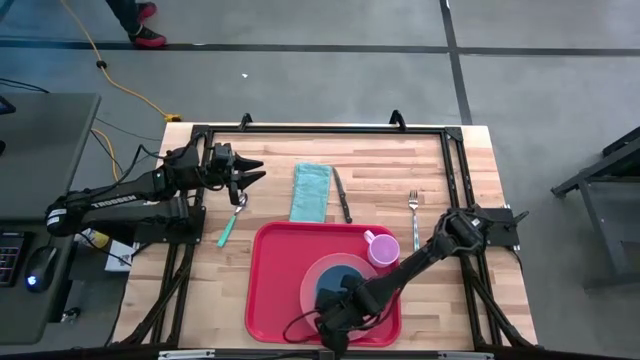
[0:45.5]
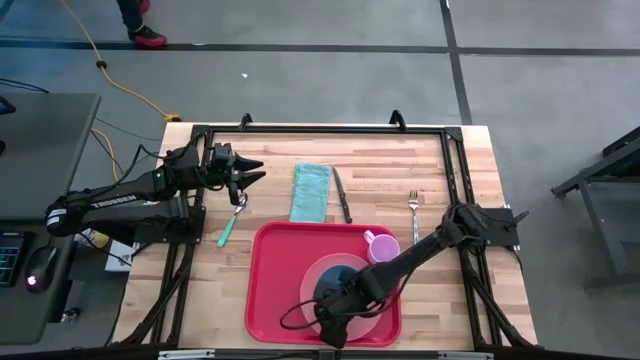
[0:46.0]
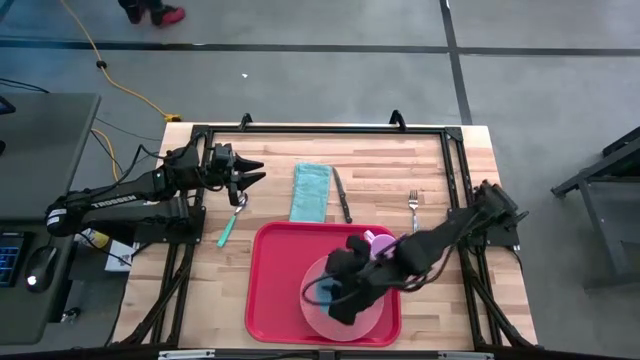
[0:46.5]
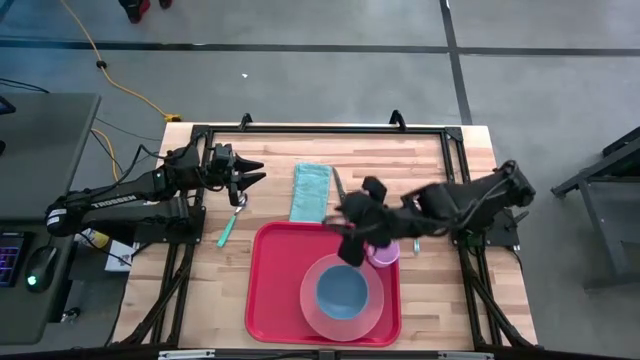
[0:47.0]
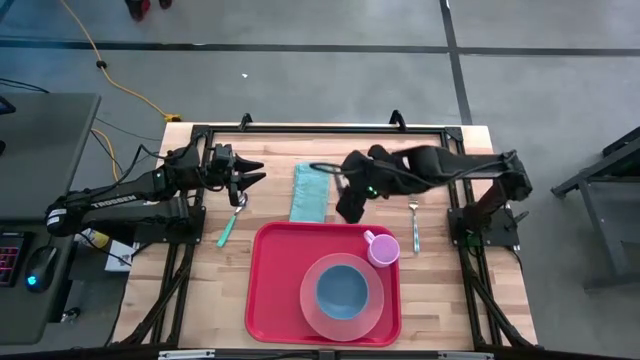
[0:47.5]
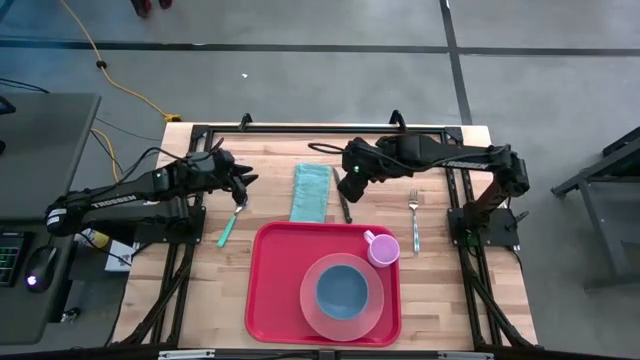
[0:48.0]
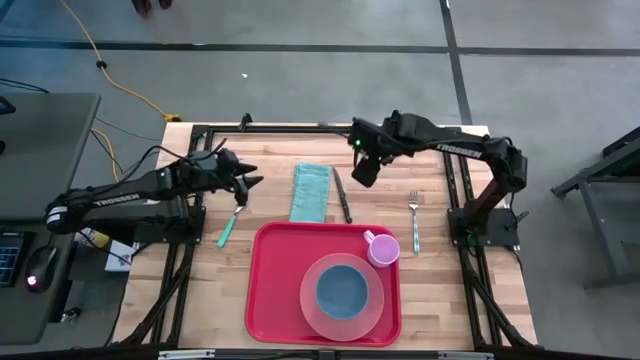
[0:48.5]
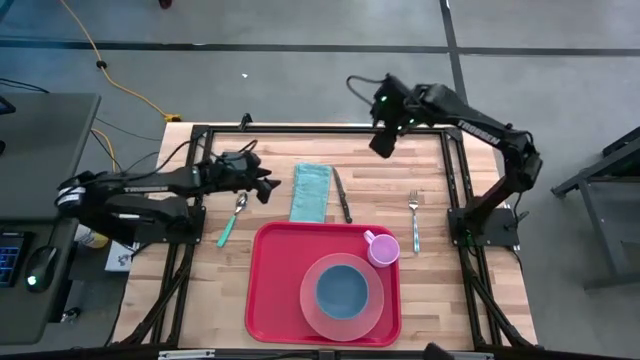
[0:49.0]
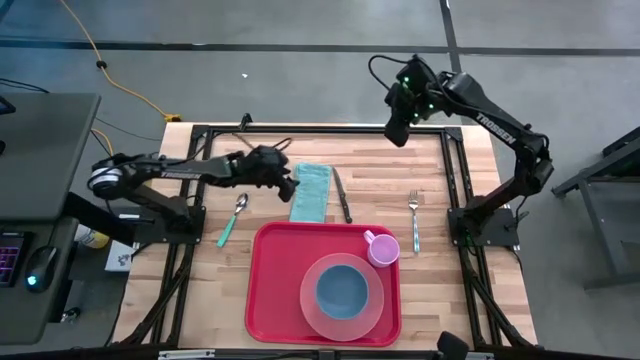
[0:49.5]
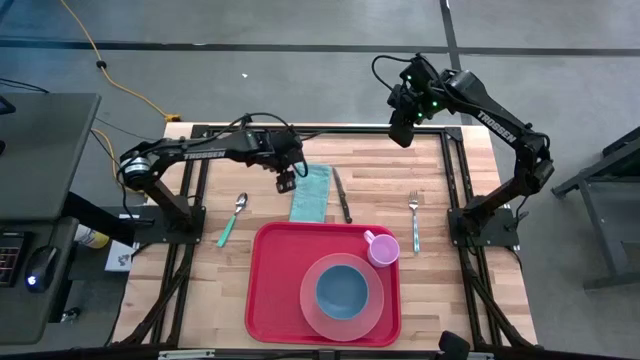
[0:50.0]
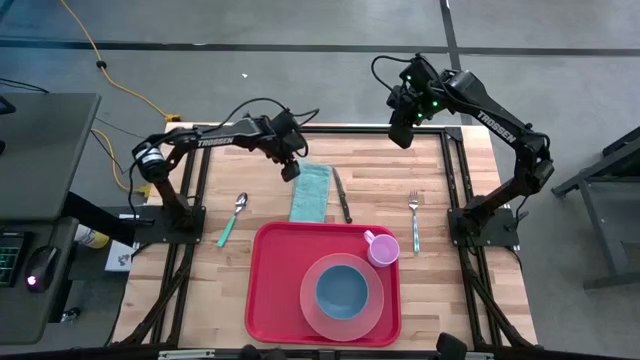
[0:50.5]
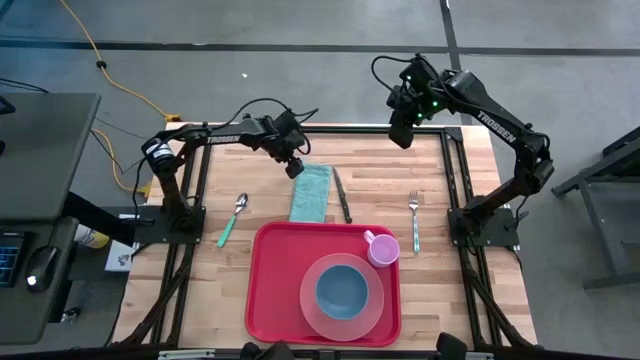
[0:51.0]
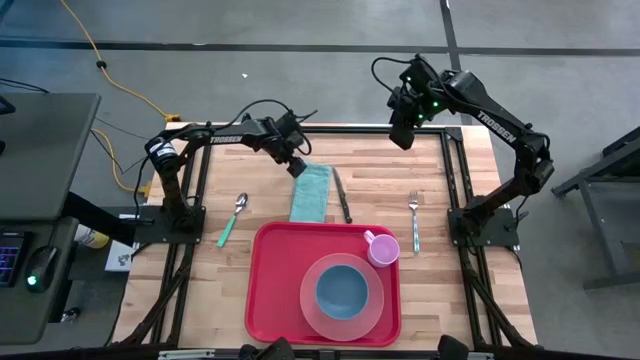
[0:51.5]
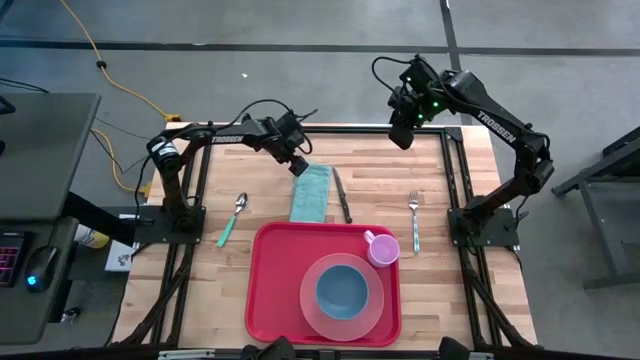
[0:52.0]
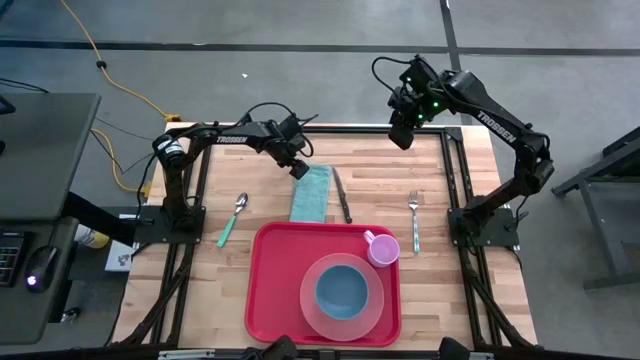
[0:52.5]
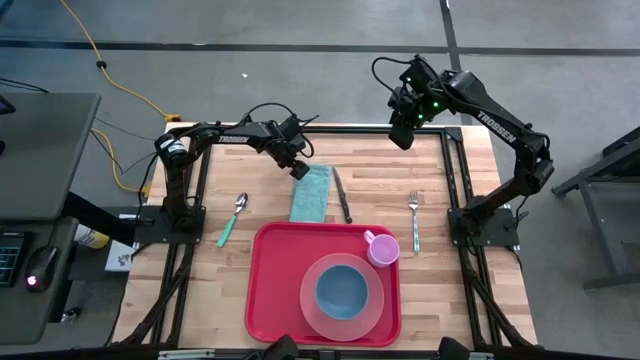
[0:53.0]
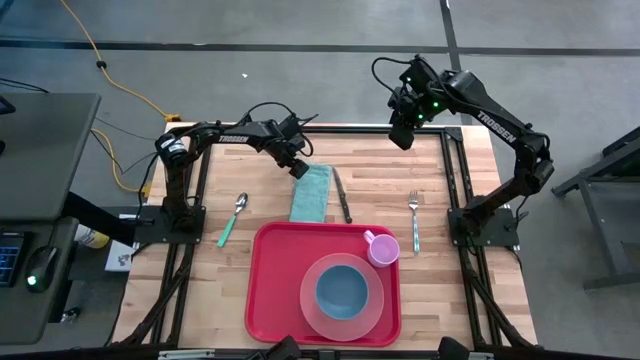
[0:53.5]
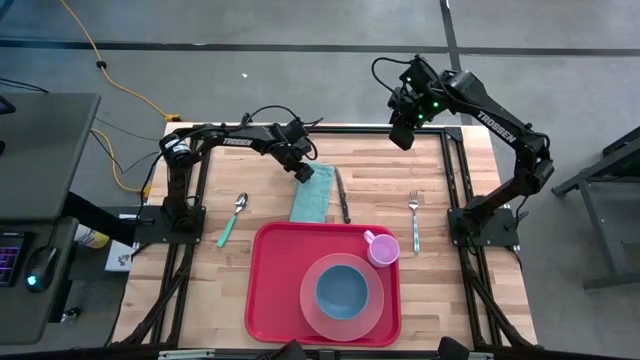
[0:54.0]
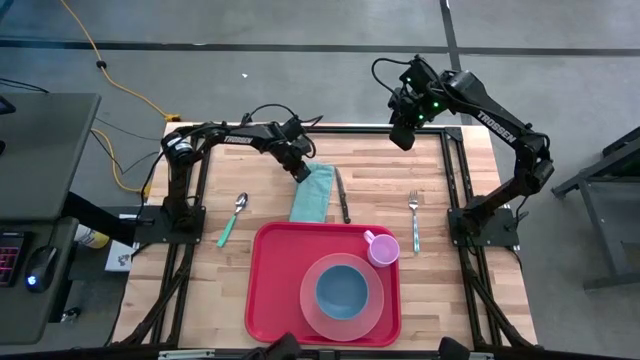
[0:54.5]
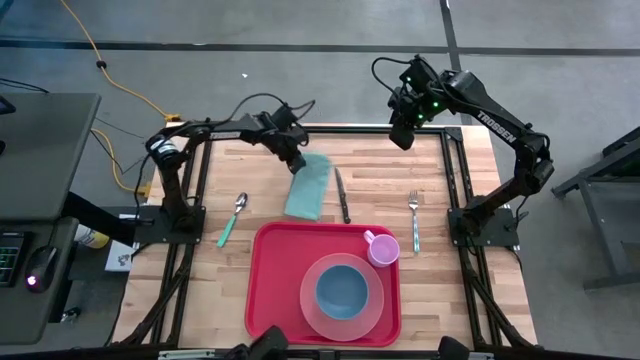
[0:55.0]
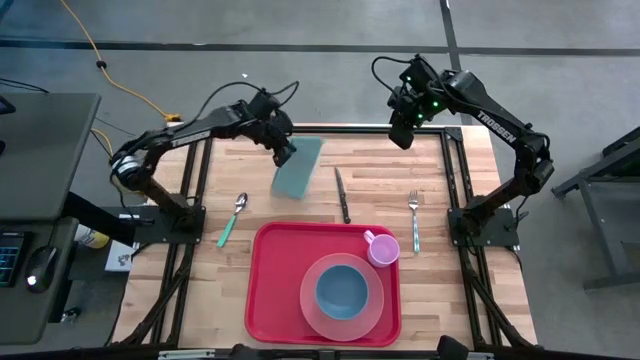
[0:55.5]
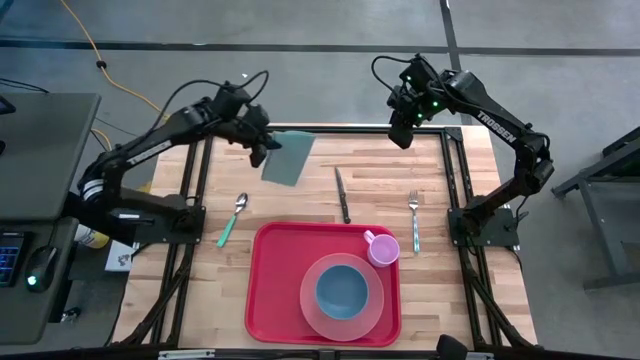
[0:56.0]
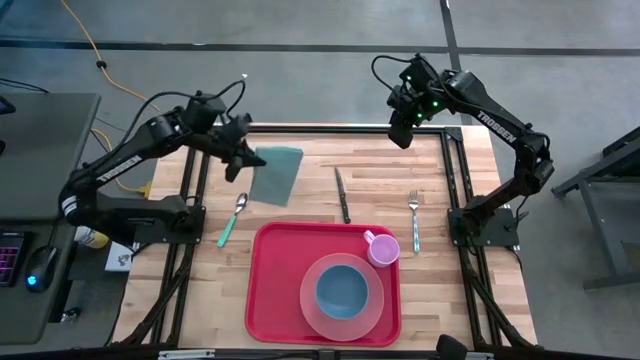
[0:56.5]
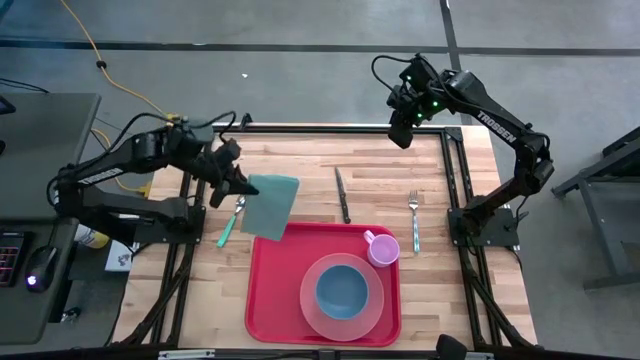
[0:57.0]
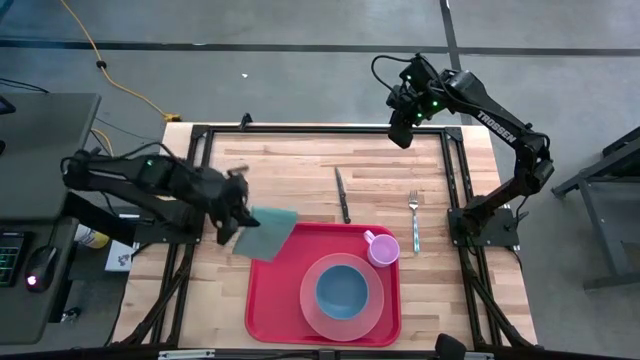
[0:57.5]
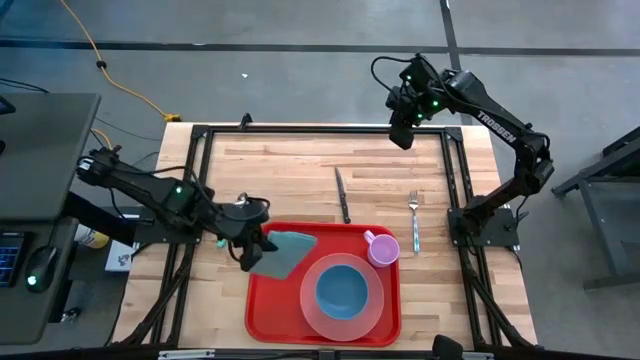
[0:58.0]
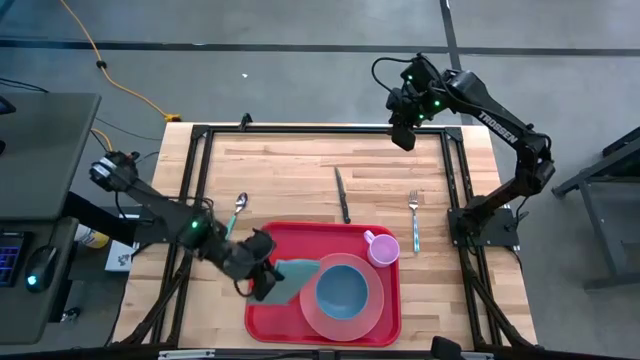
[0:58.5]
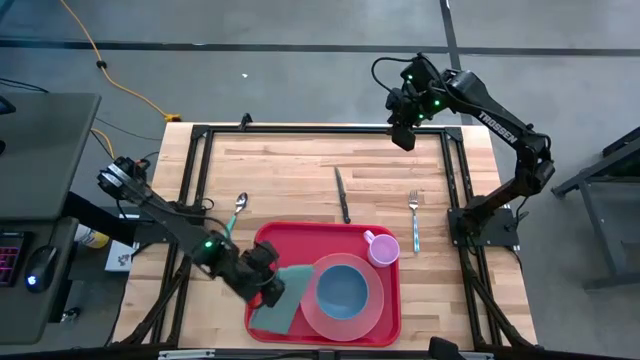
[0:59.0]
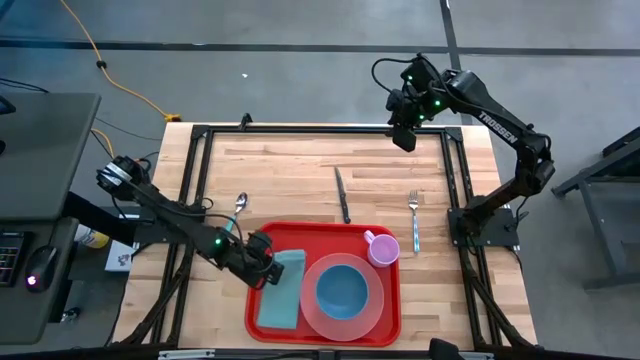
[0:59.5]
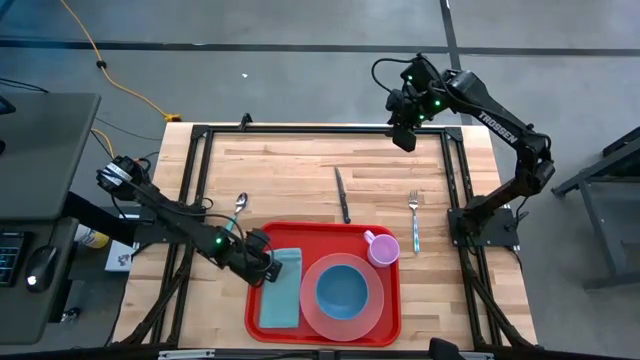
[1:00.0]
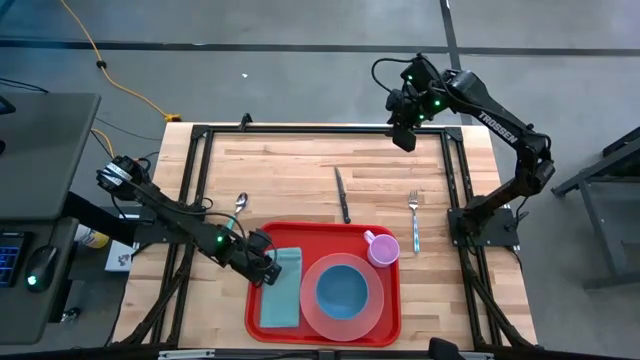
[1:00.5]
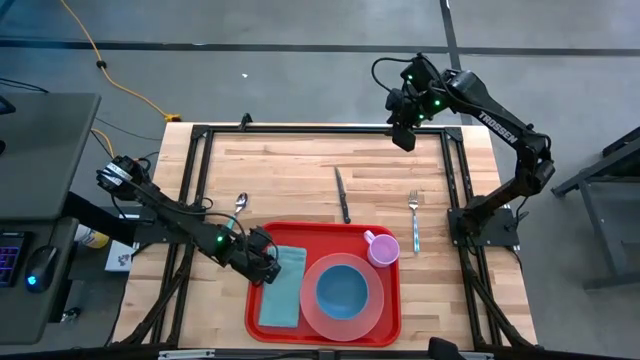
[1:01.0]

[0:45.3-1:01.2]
Task: Set up tray
Put the blue napkin on the red serving tray to the left of the pink plate

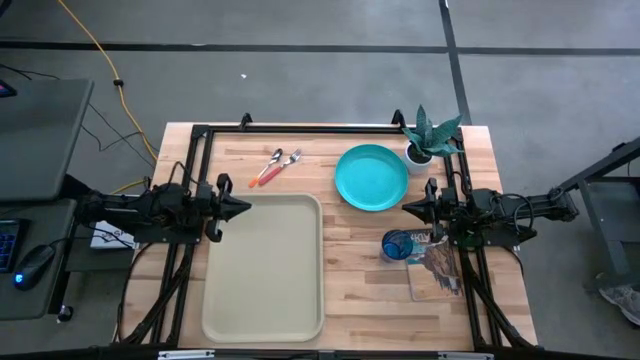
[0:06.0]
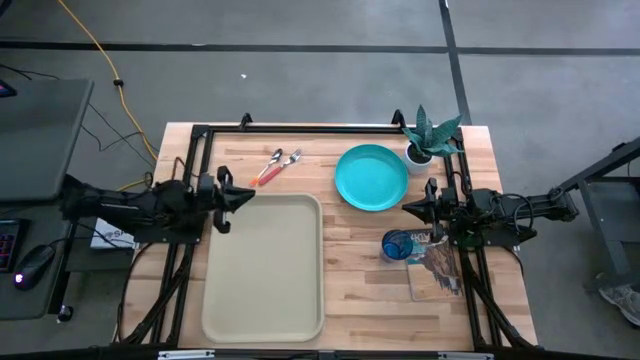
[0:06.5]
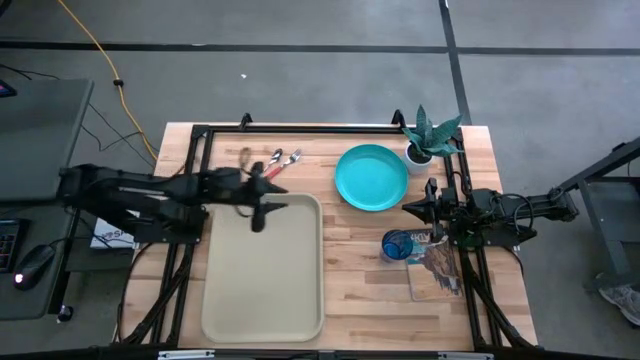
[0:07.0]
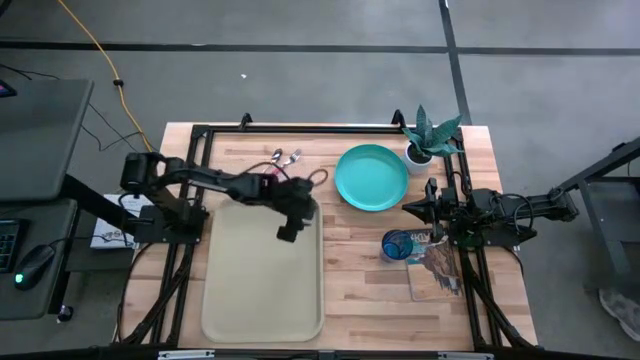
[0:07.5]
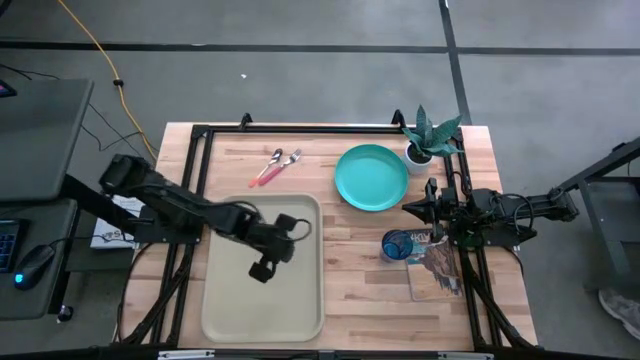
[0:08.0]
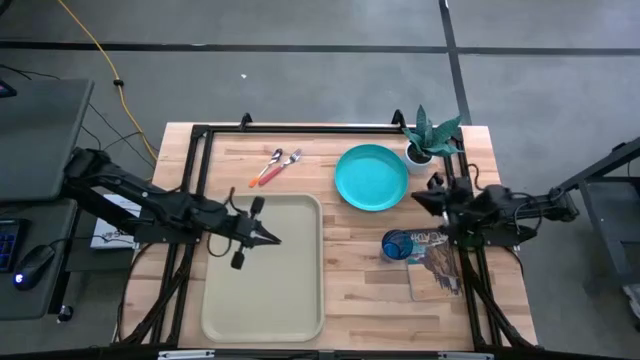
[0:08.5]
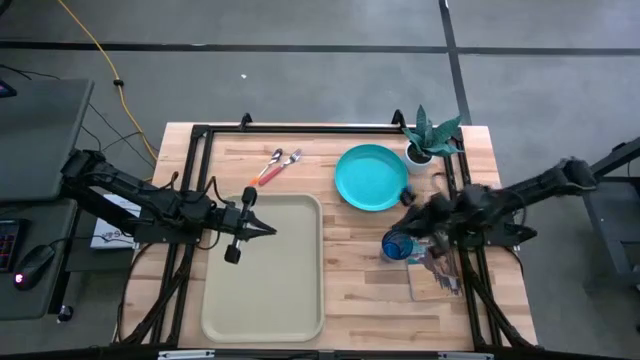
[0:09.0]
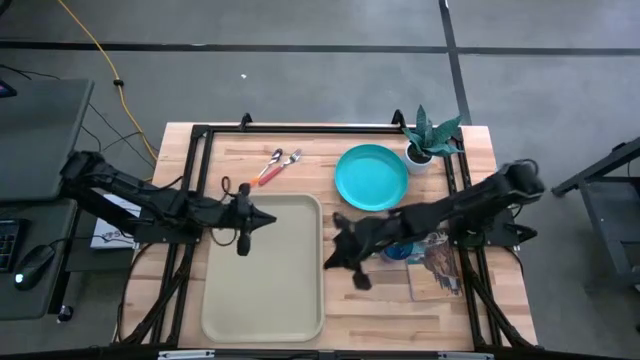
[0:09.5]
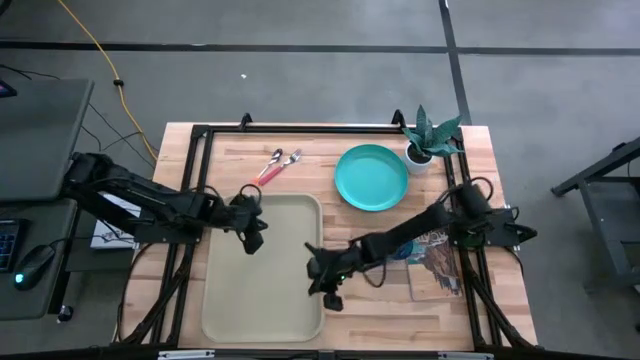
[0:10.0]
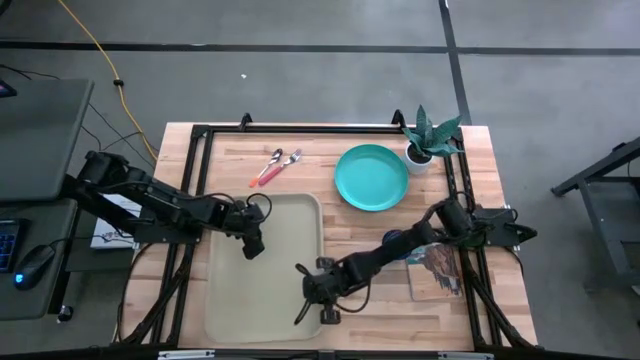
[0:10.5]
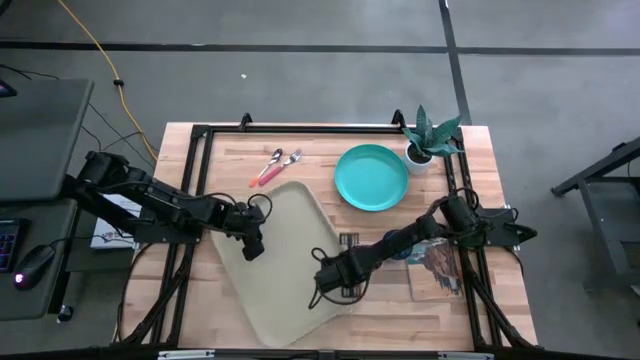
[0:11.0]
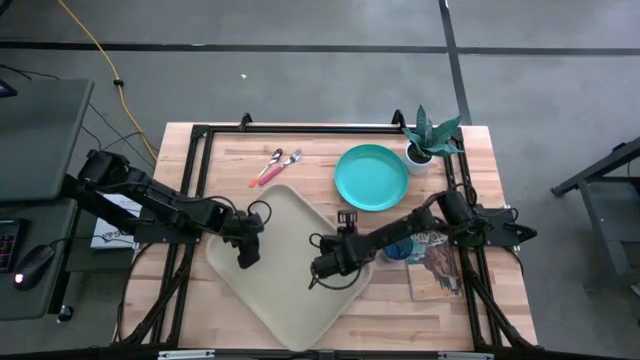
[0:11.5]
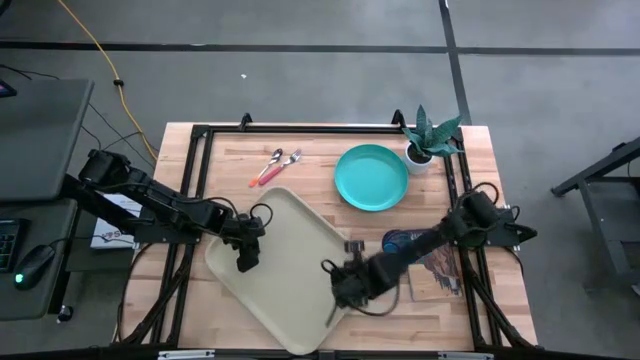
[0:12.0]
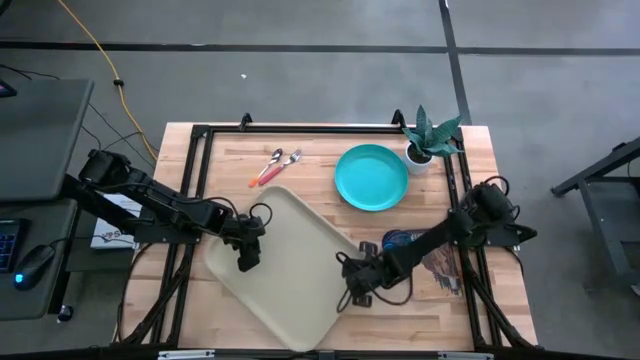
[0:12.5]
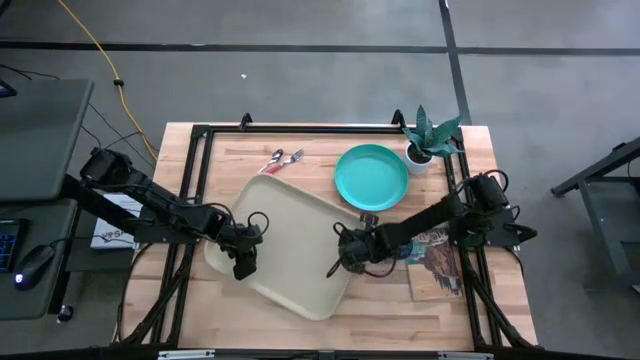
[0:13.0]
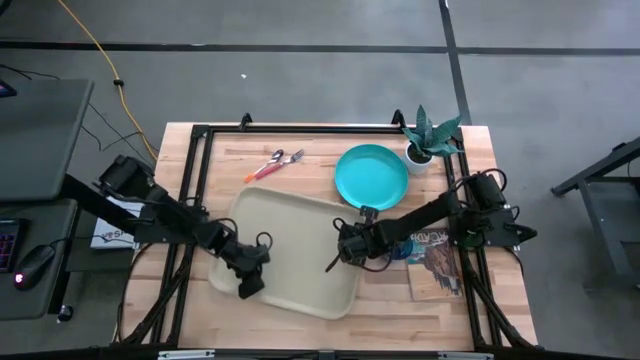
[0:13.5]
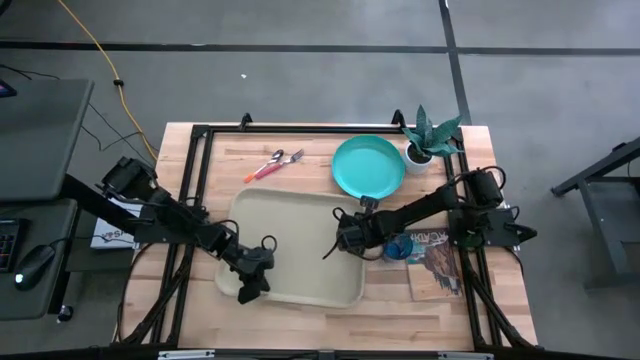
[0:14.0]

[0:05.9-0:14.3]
Task: Pick and place plate/cup/fork/spoon on tray
Adjust the gray serving tray to the center of the table
